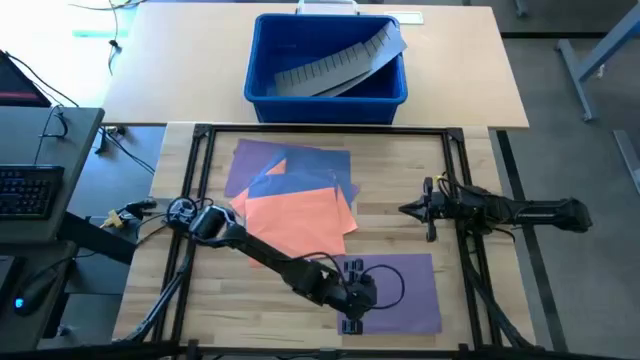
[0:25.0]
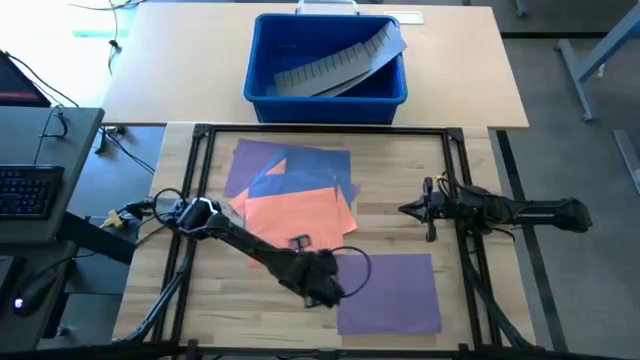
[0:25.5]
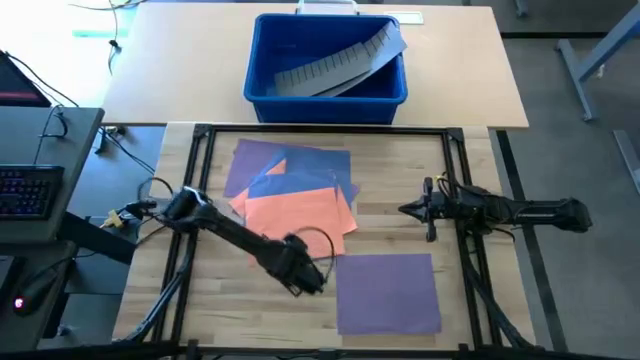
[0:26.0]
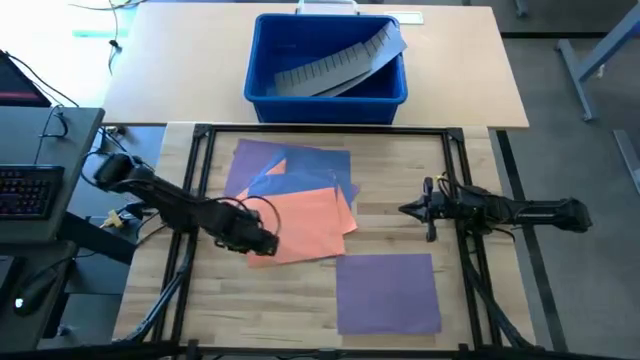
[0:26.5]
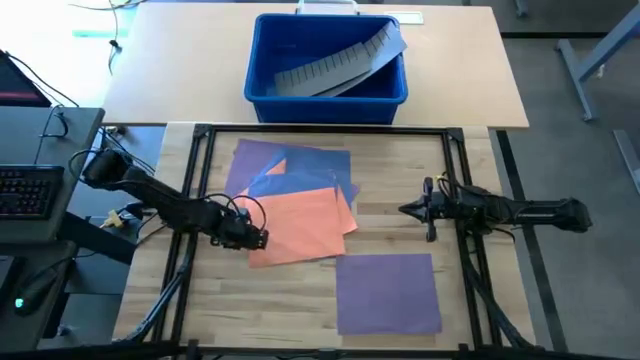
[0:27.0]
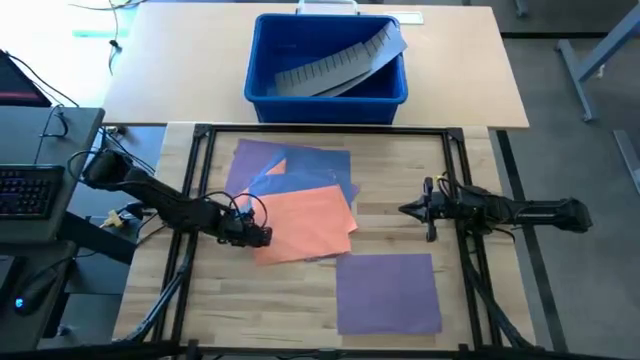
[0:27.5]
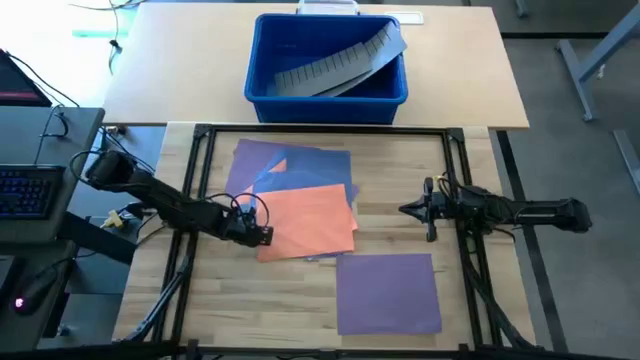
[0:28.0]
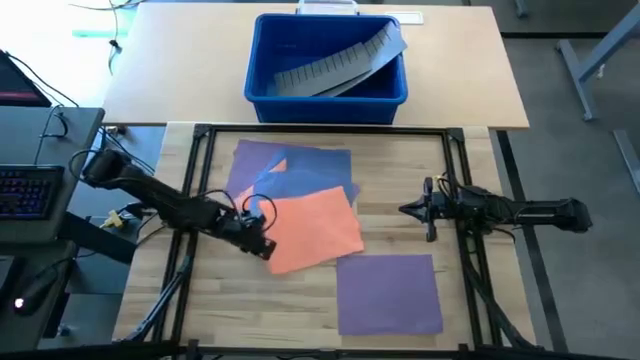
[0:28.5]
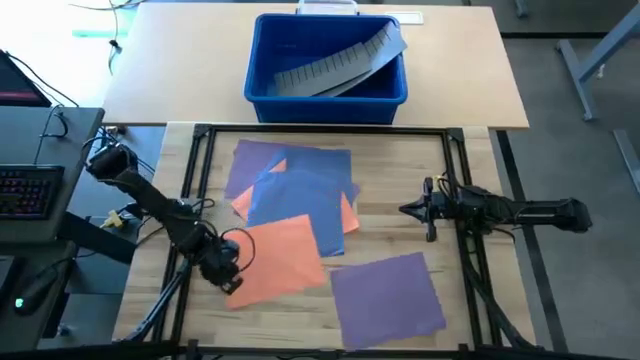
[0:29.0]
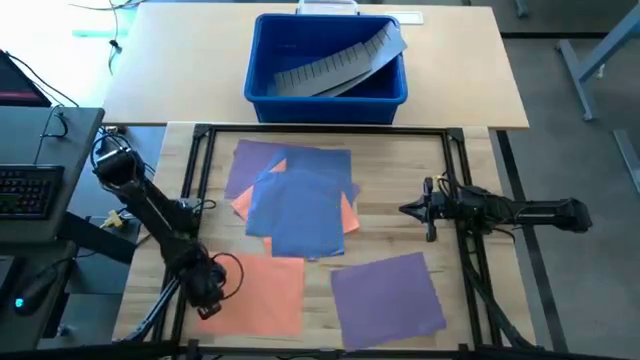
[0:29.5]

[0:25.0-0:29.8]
Task: Organize paper
Move the orange paper to the bottom left of the table

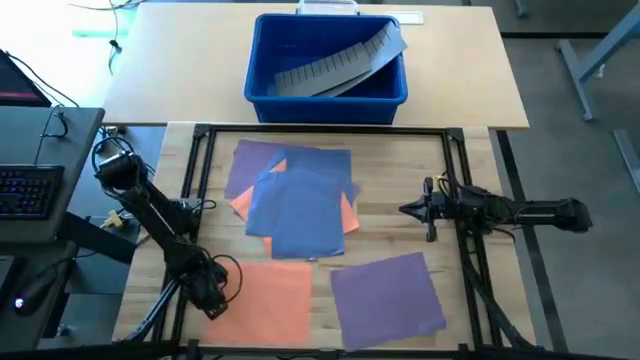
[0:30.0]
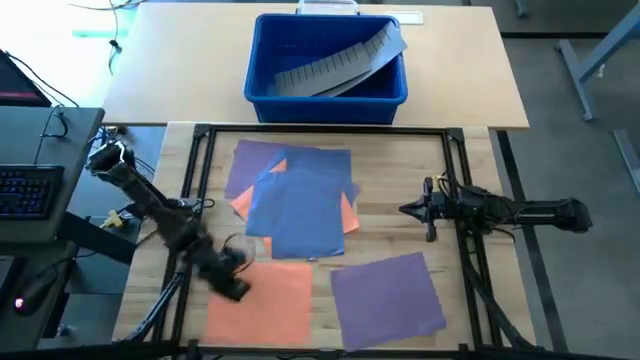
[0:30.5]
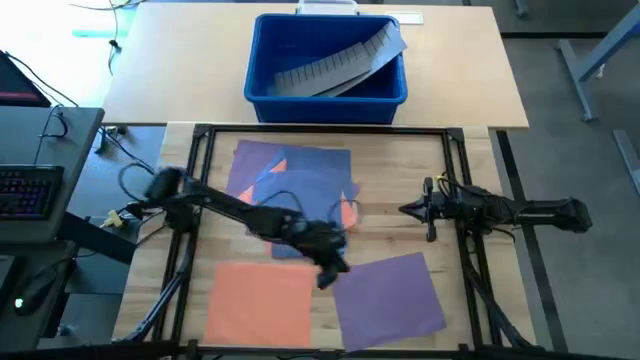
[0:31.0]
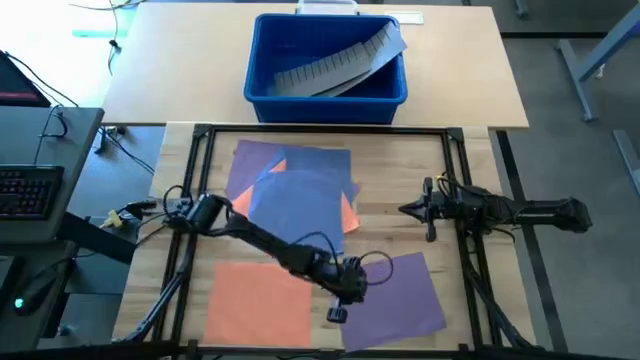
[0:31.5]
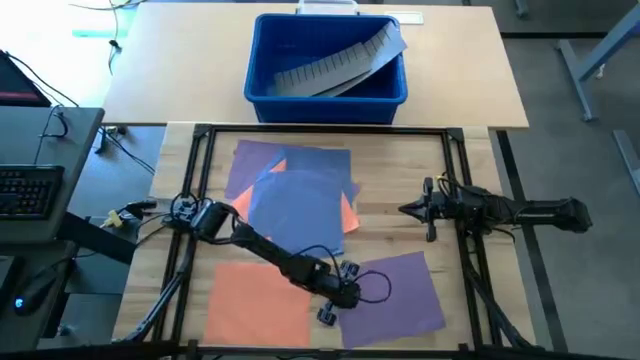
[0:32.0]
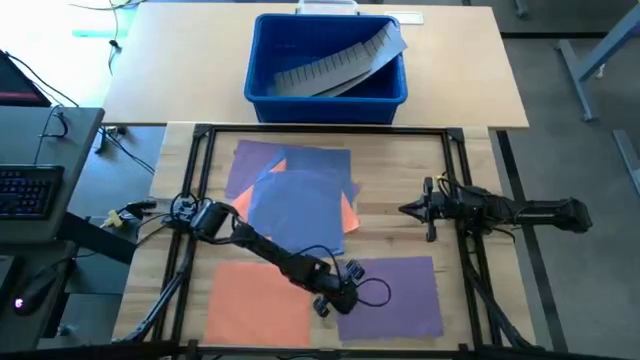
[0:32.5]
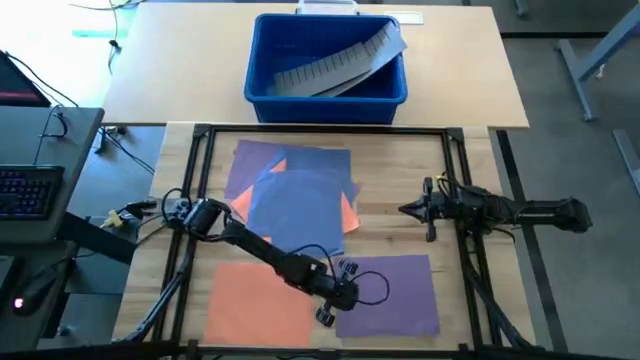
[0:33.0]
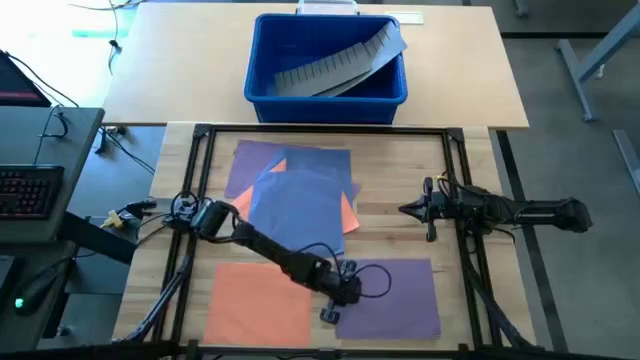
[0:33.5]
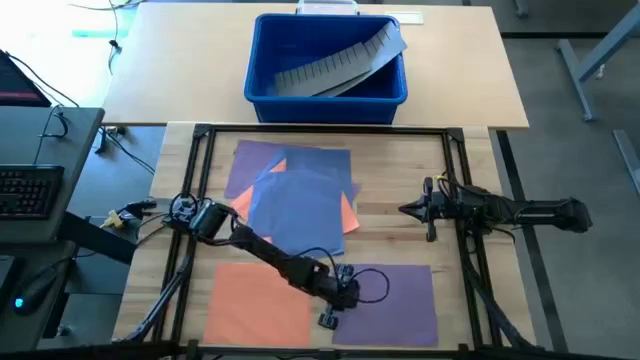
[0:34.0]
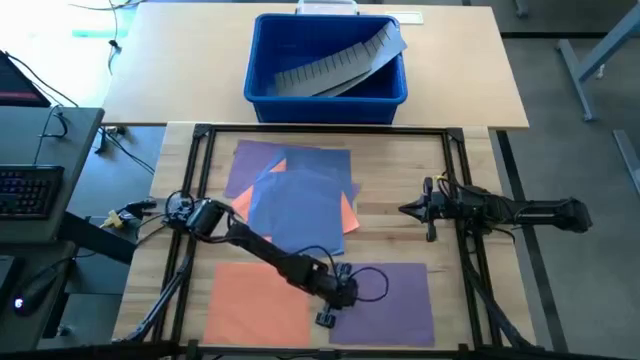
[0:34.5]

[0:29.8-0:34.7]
Adjust the purple paper on the table

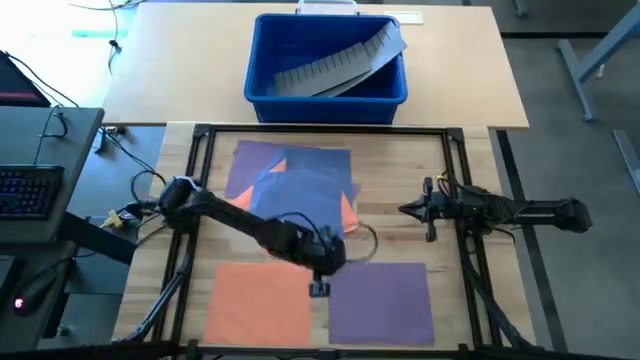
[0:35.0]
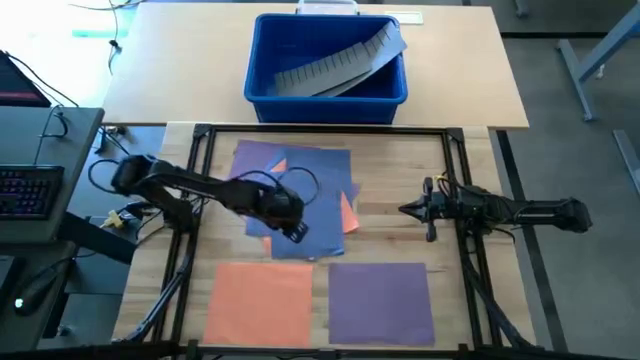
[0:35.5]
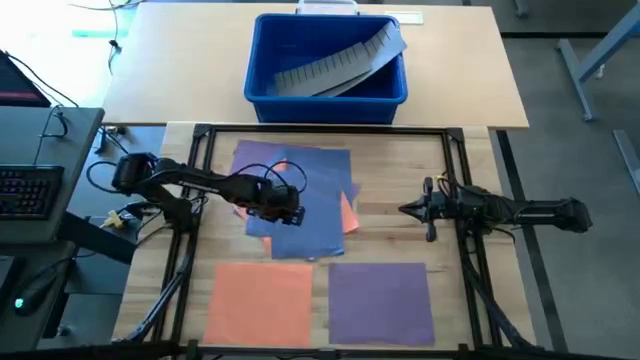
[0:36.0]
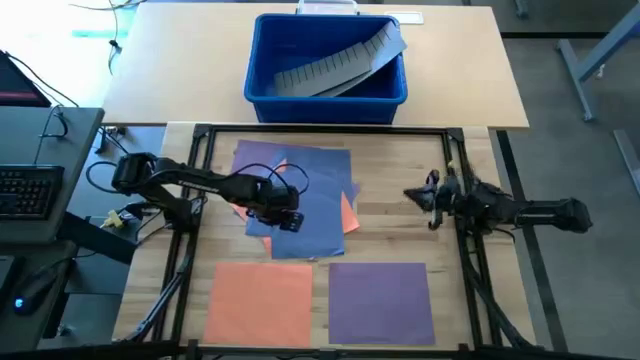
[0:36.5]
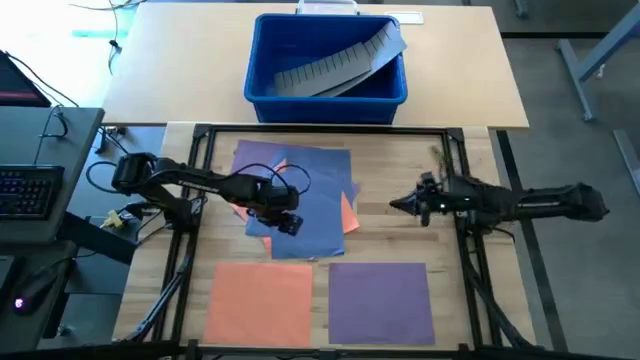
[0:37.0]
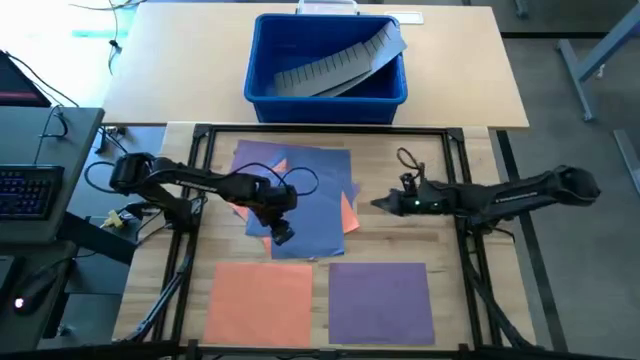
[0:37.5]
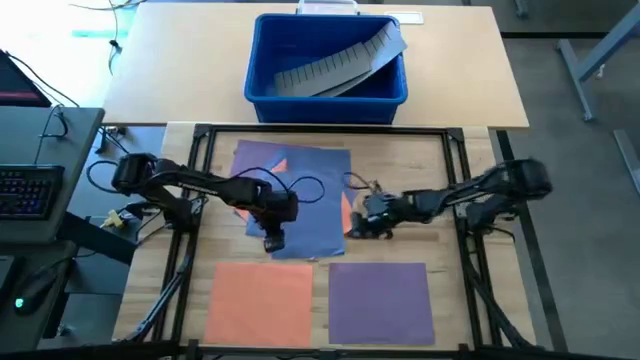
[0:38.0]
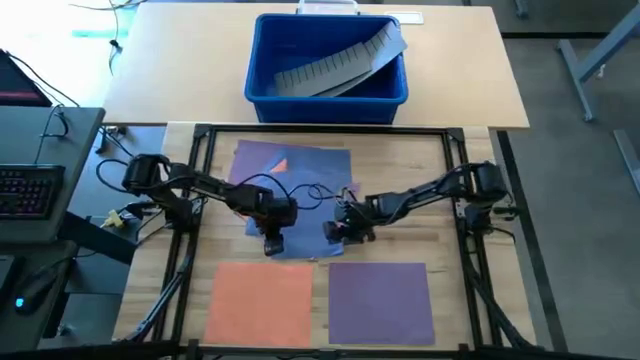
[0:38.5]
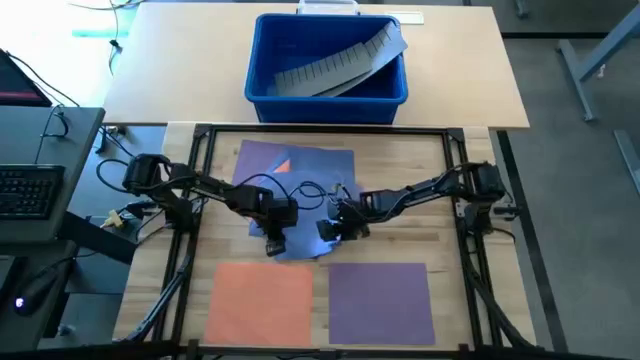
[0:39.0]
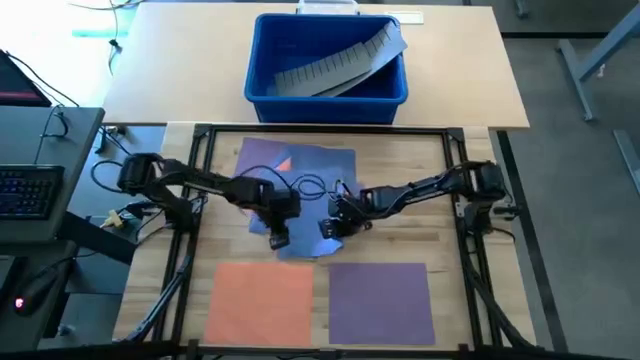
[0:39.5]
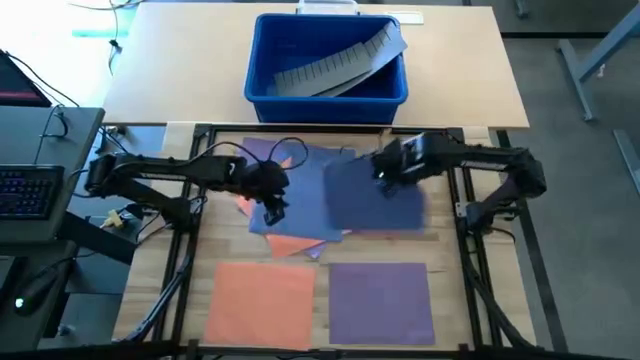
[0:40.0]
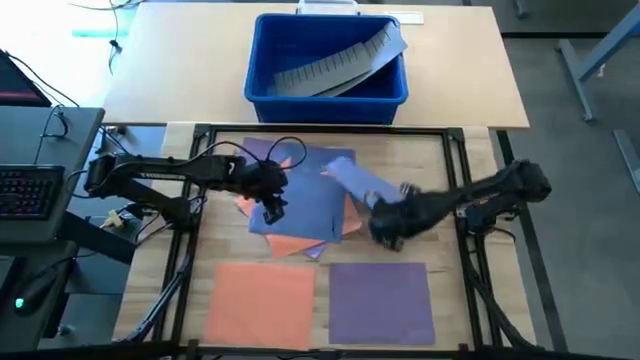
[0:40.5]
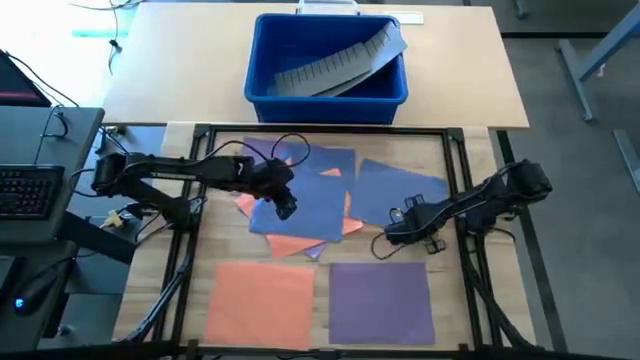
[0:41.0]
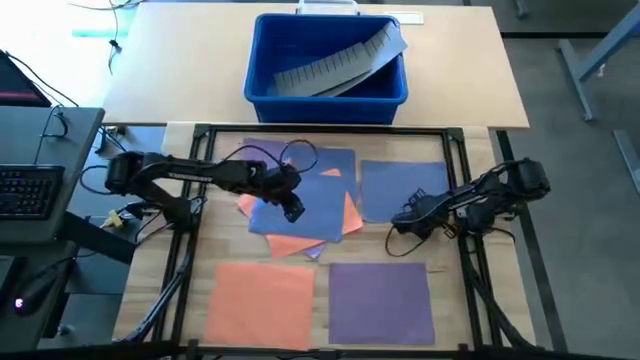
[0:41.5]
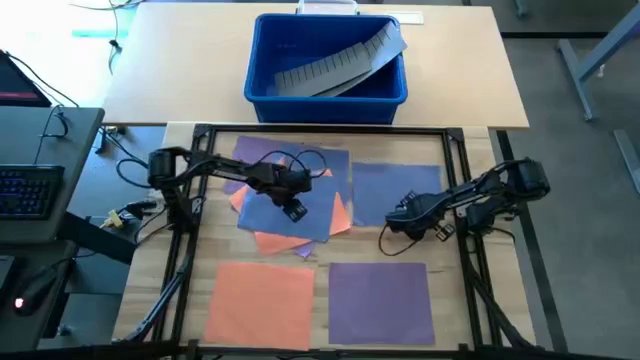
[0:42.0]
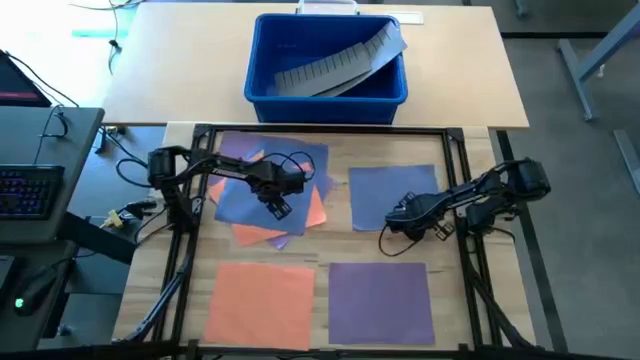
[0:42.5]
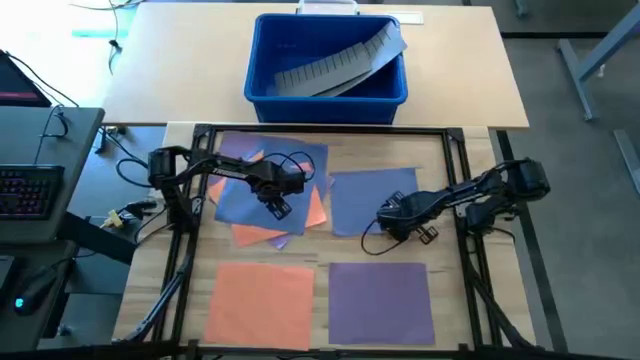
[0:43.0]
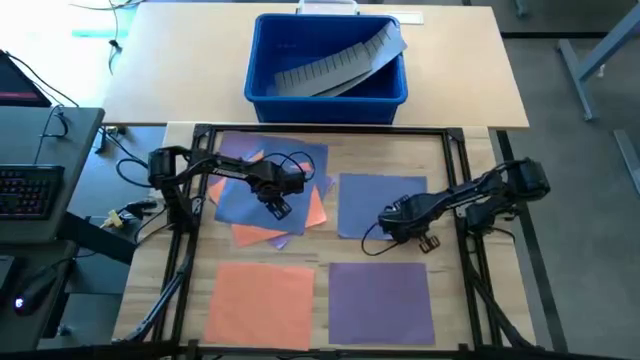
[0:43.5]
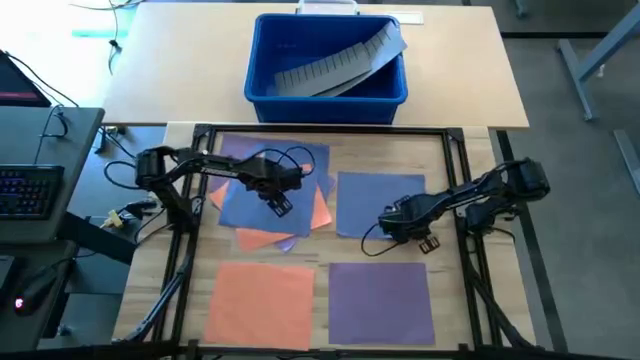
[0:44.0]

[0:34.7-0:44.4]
Move the blue paper to the top right of the table

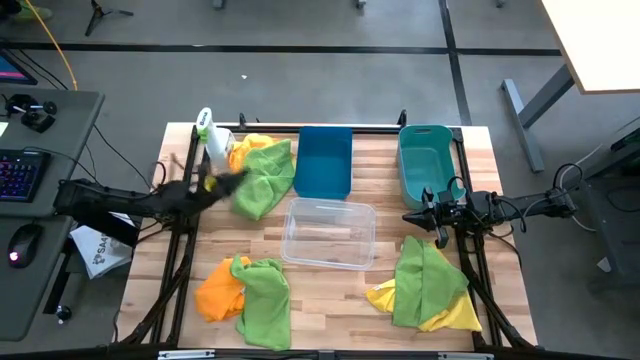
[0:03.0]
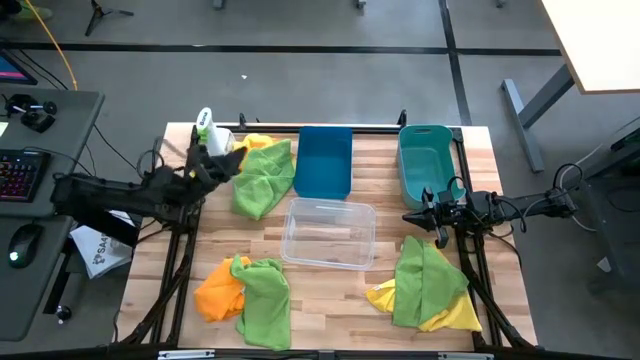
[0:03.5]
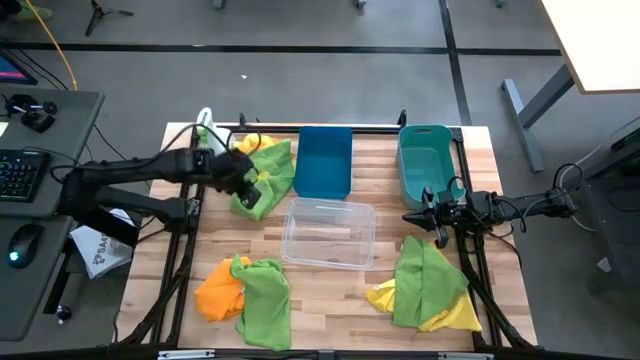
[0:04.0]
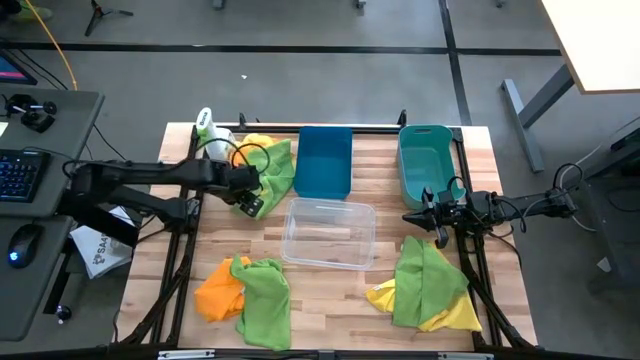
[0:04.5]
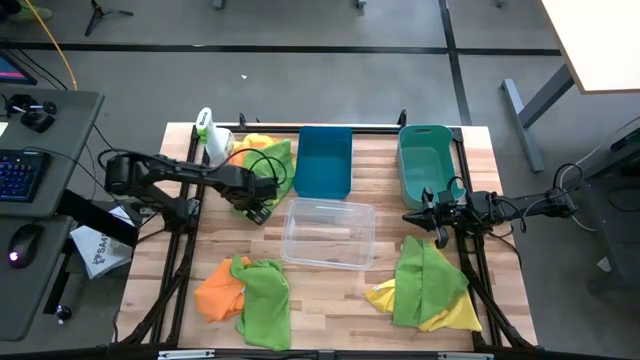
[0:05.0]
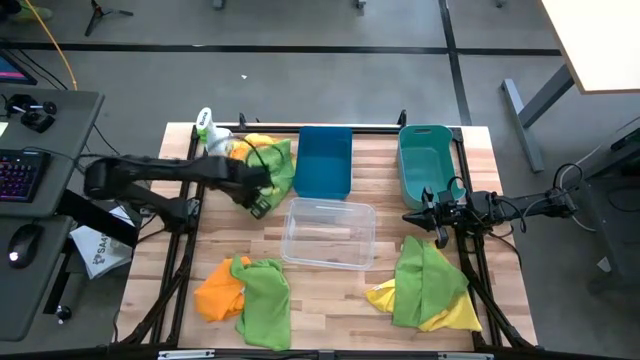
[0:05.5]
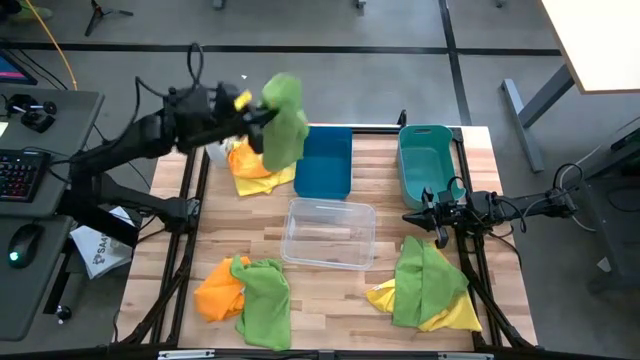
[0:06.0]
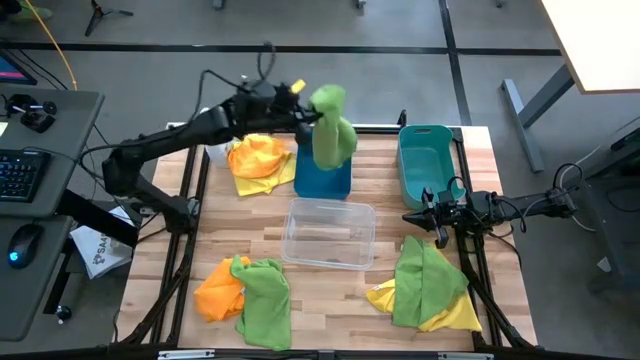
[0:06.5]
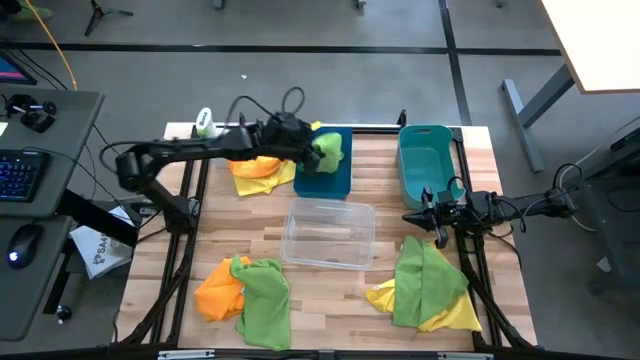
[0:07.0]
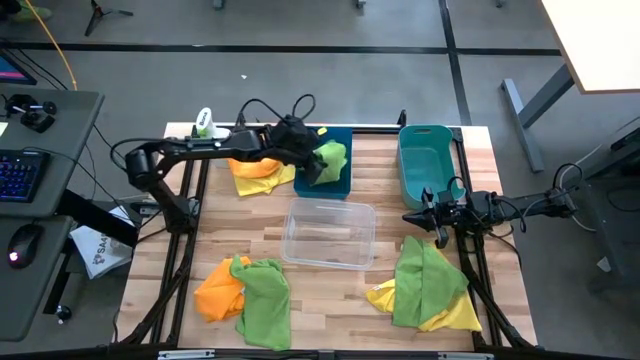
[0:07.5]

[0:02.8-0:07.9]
Task: Sort microfiber towel by color & place in baskets
Put the top left green microfiber cloth into the blue bin
